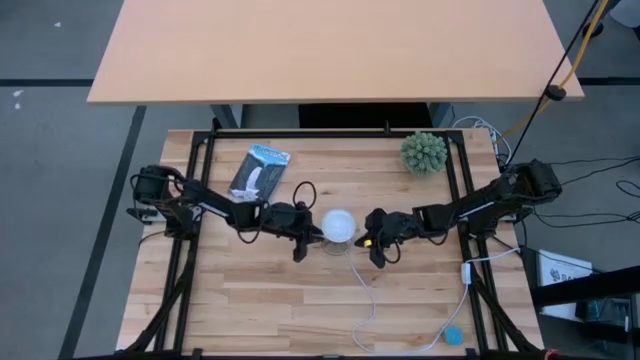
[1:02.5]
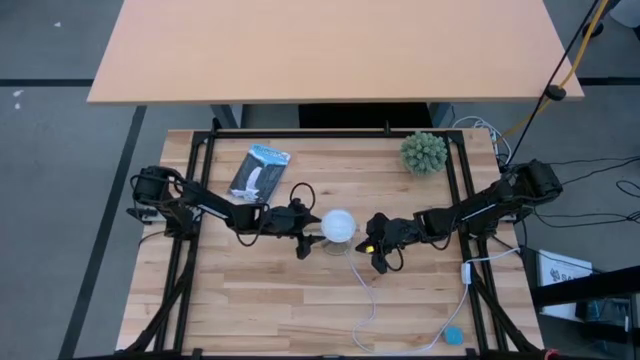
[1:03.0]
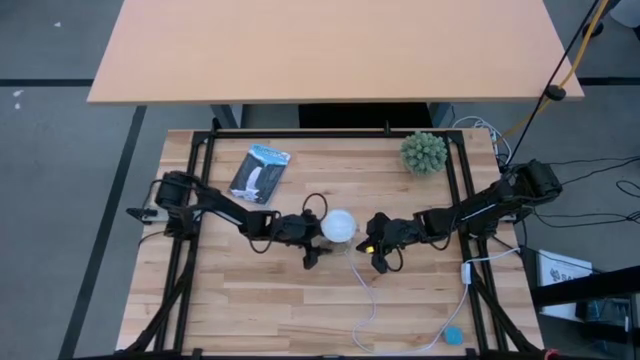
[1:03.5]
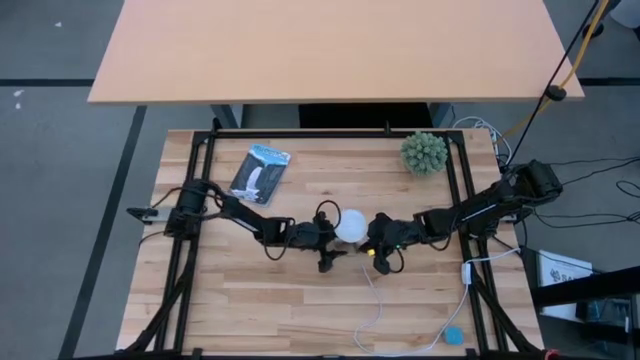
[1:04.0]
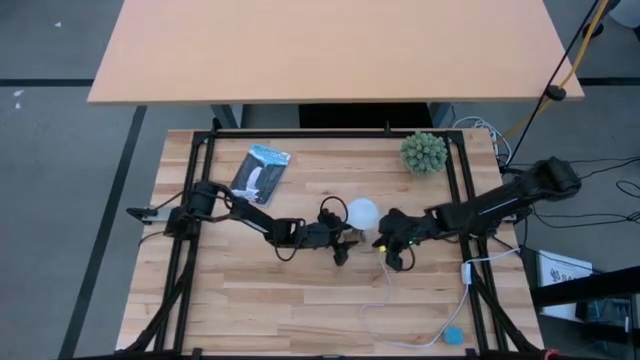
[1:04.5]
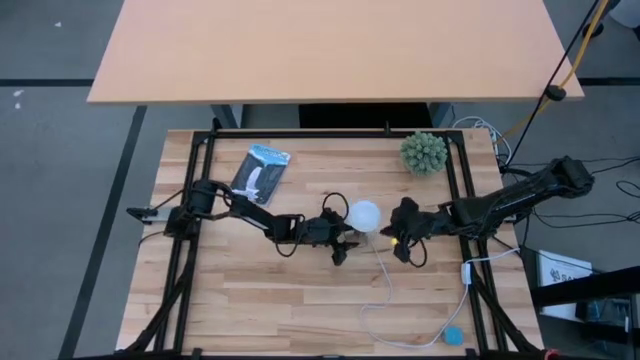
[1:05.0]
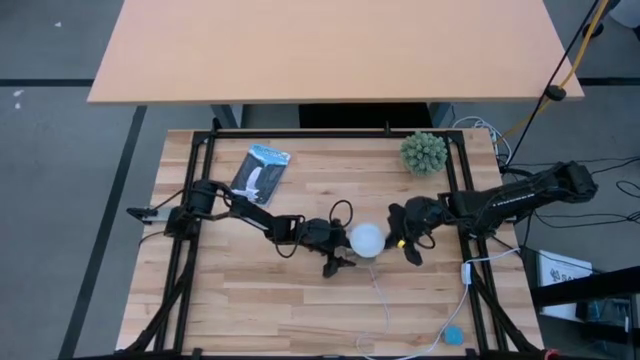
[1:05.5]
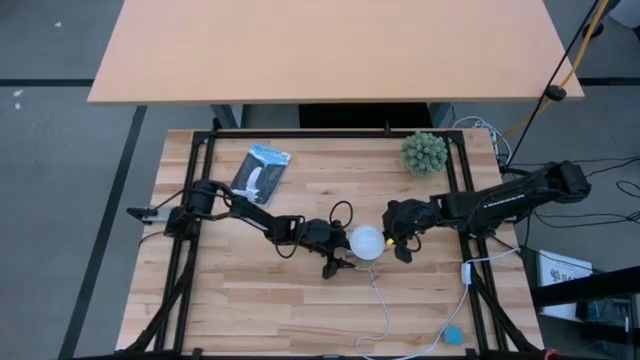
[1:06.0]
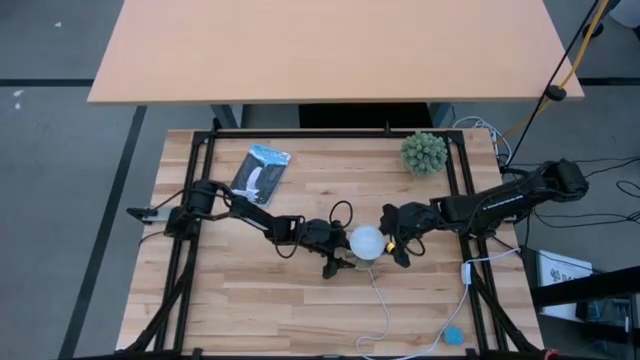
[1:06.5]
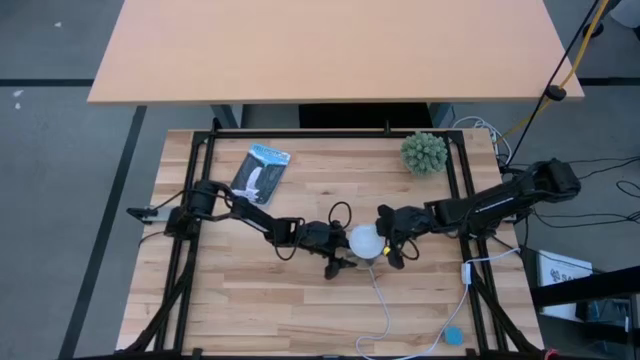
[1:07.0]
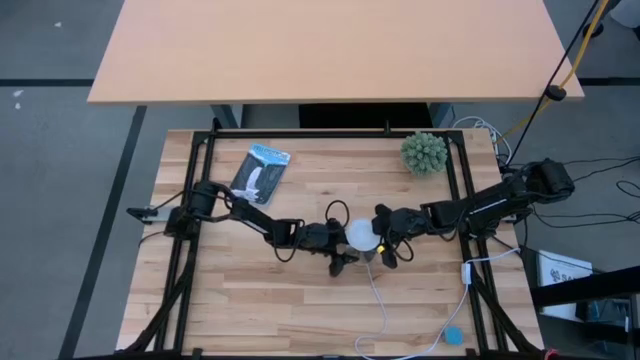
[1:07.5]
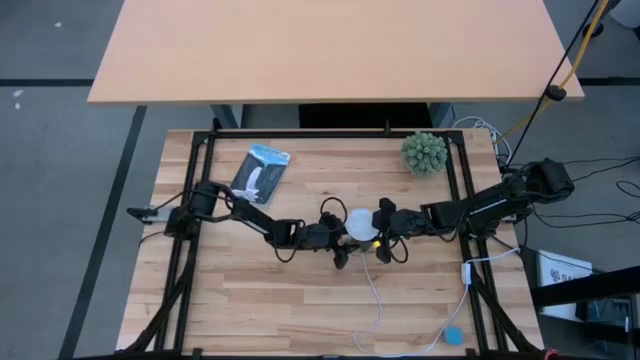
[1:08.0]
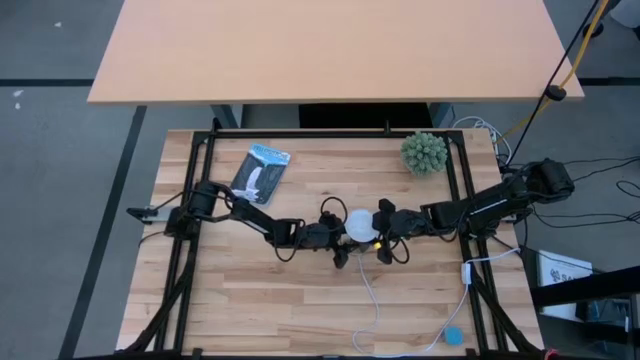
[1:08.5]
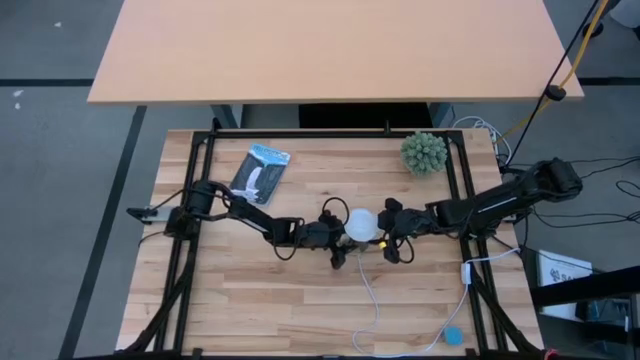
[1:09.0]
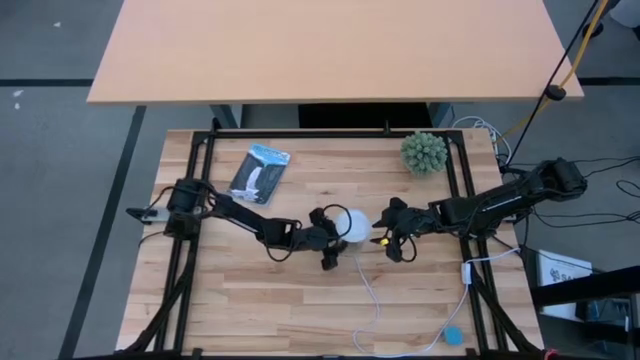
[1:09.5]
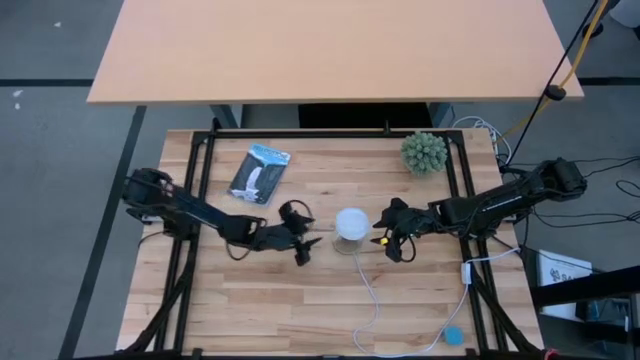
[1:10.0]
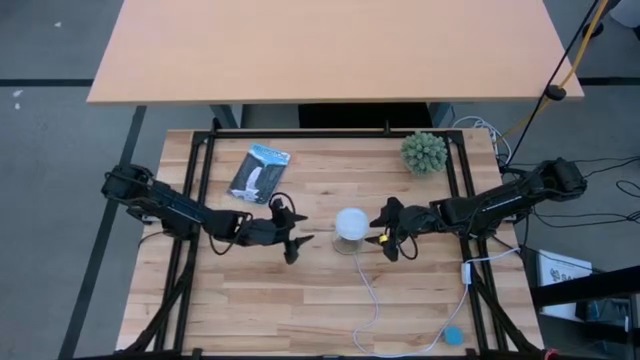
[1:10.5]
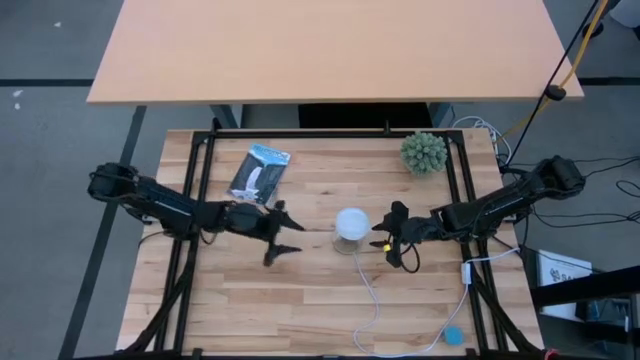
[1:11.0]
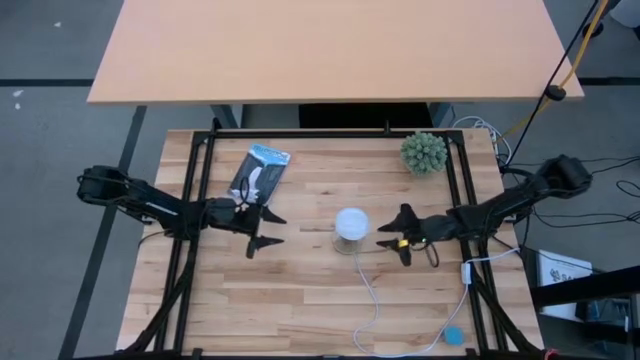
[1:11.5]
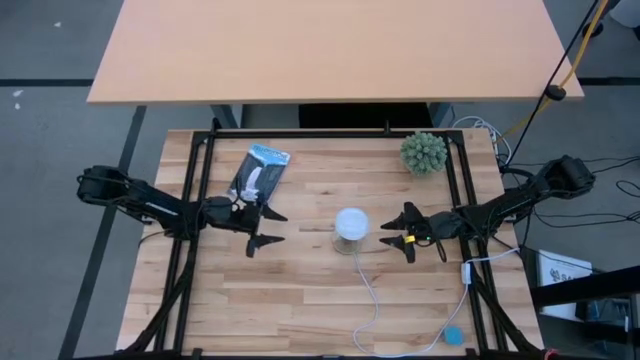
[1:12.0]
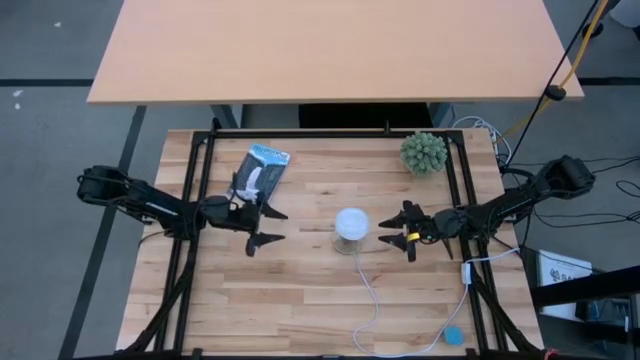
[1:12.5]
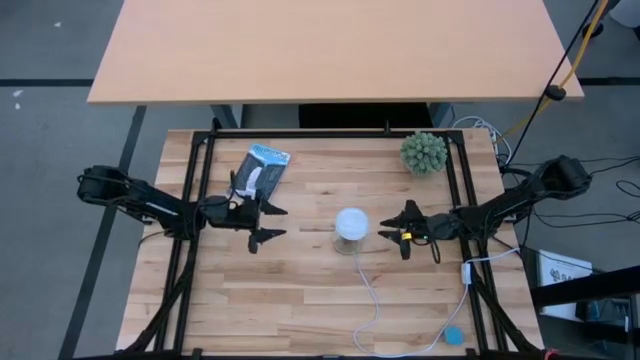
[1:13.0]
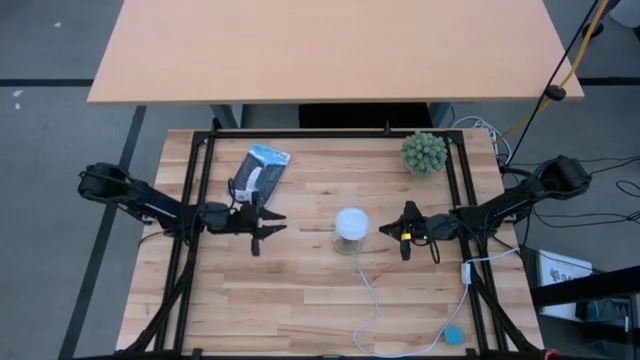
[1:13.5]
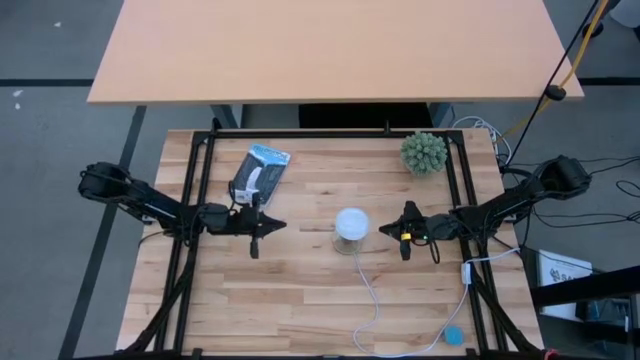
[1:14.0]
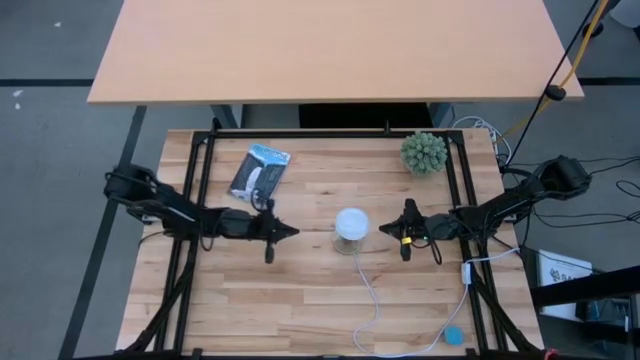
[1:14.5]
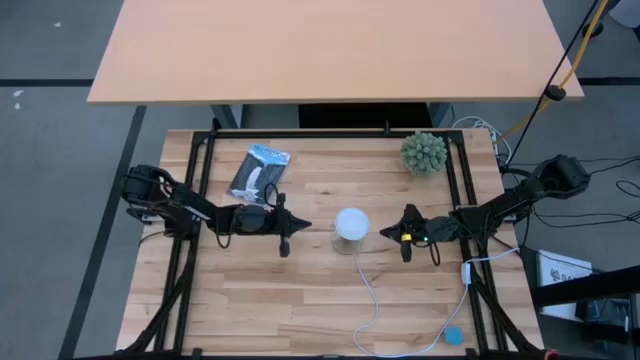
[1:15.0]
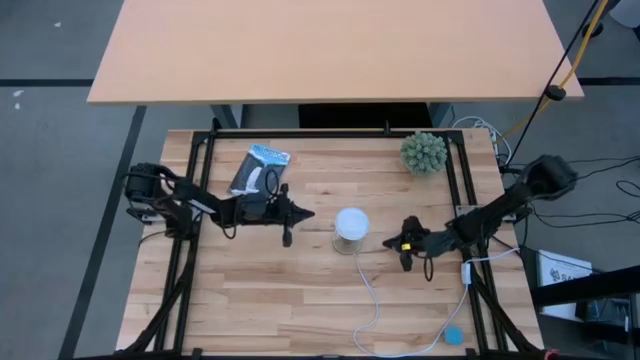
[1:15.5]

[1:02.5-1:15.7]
Task: Screw lightbulb
Remove the white lightbulb from the gold lamp

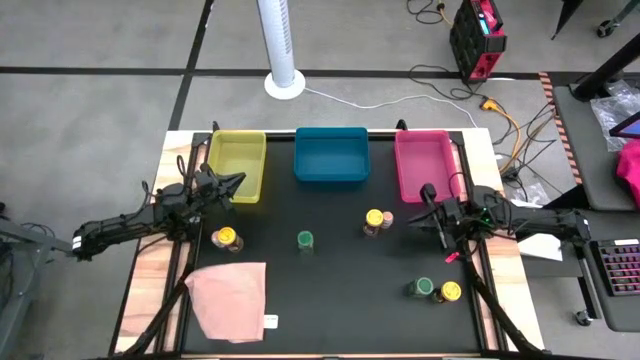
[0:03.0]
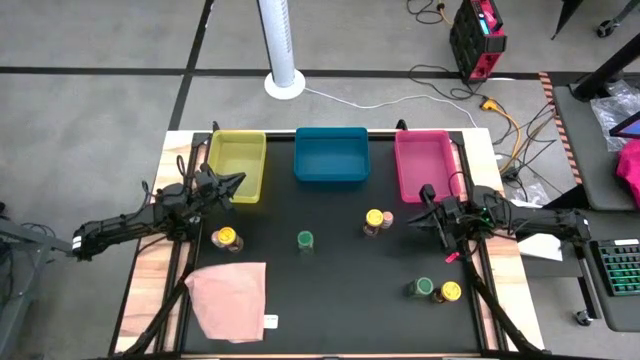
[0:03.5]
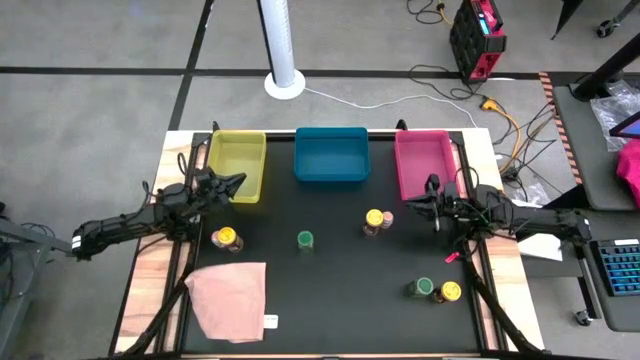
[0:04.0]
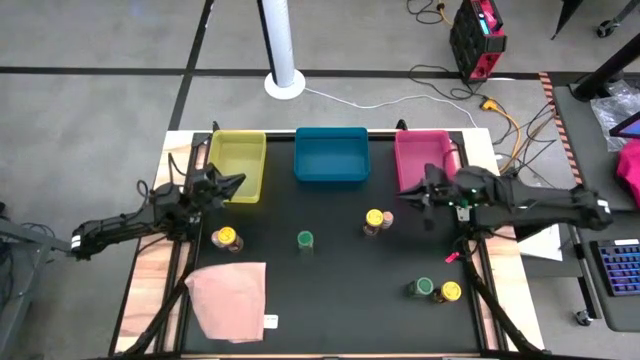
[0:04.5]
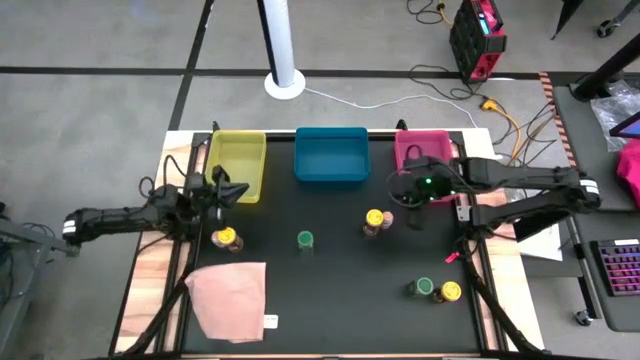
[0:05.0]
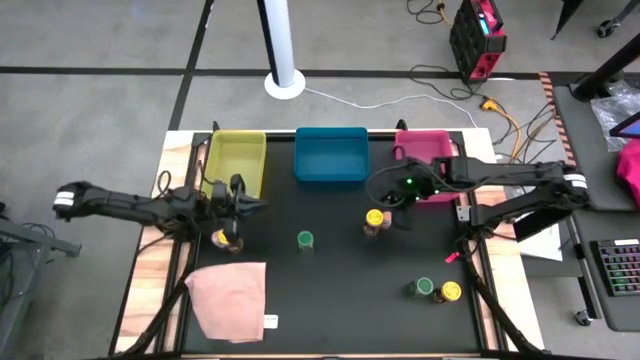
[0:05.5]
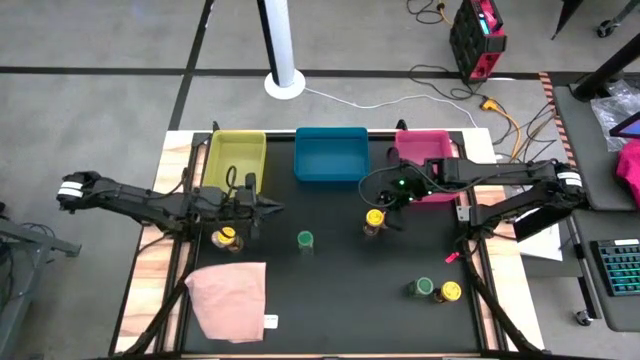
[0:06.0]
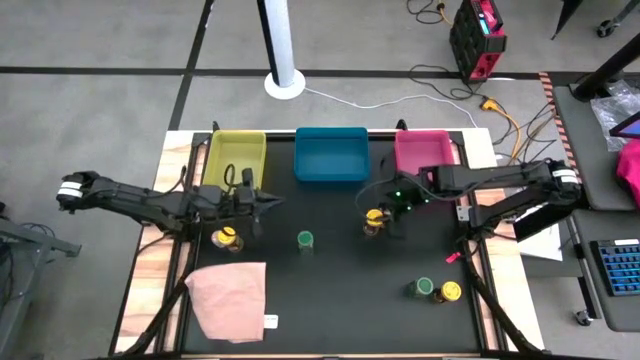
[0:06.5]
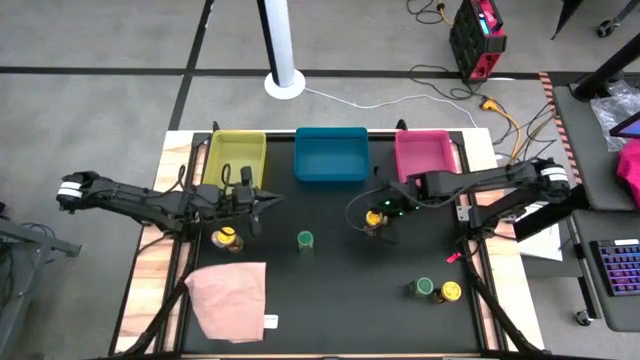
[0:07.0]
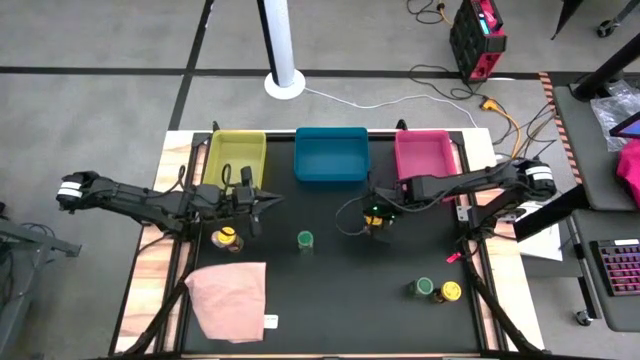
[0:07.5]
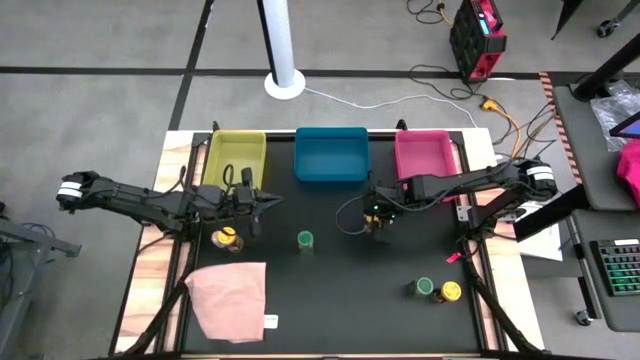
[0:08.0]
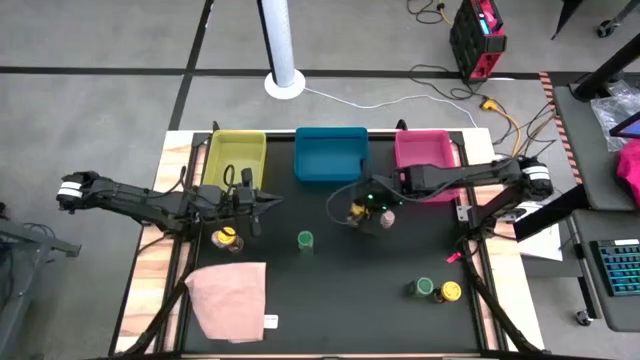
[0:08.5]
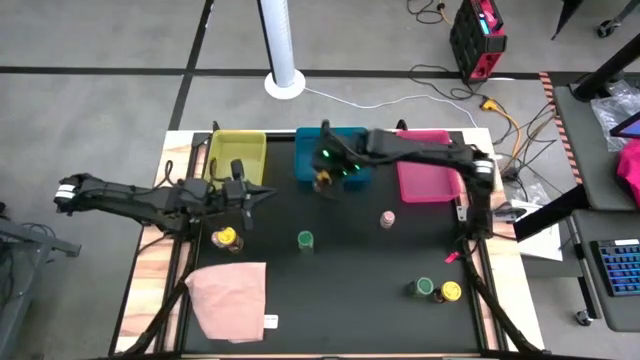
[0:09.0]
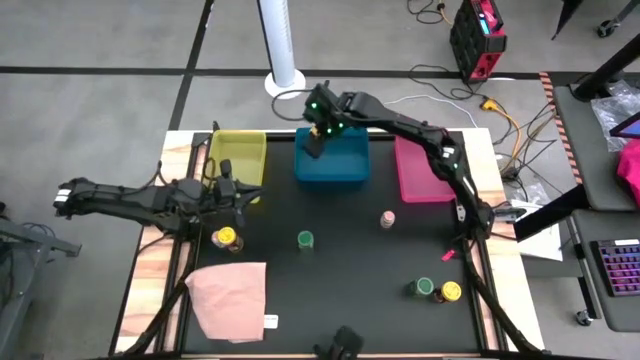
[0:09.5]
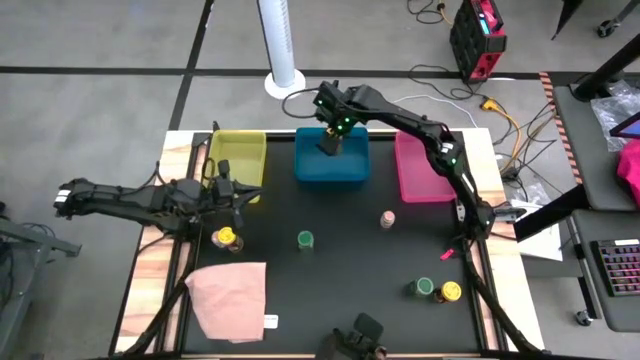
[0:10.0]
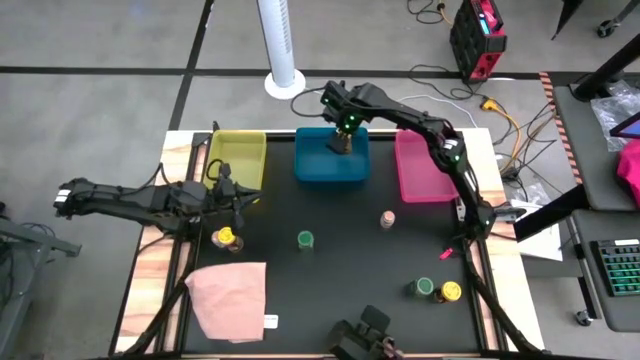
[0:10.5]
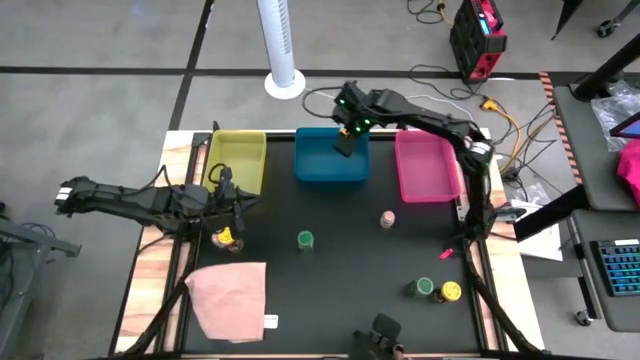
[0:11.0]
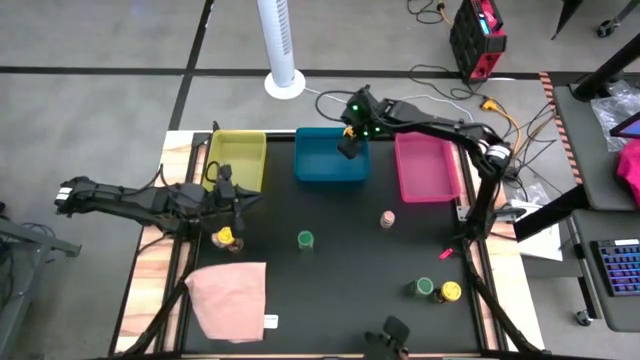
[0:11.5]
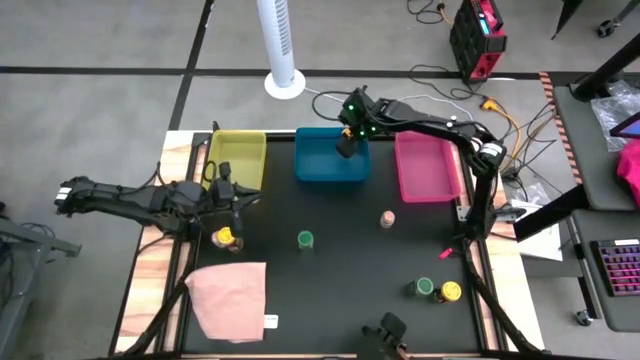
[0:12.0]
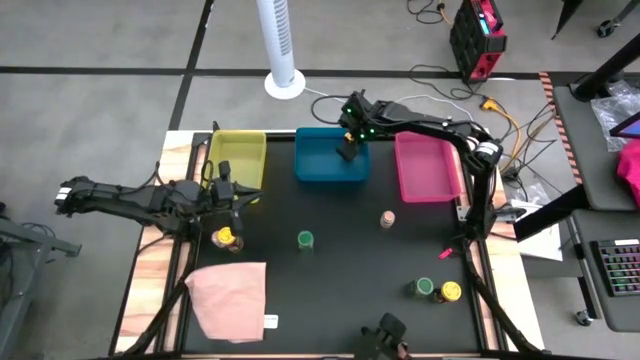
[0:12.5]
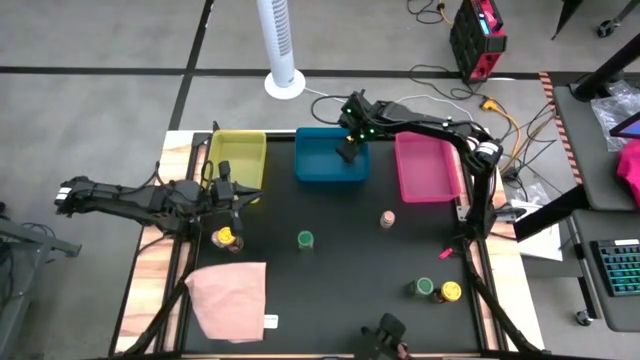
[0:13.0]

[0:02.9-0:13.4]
Task: Sort spices by type
Put the center yellow seasoning bottle into the blue bin
